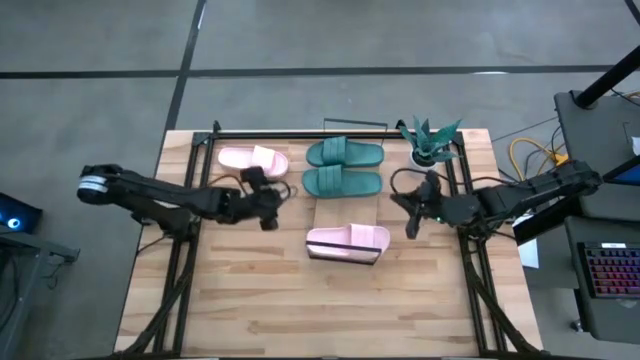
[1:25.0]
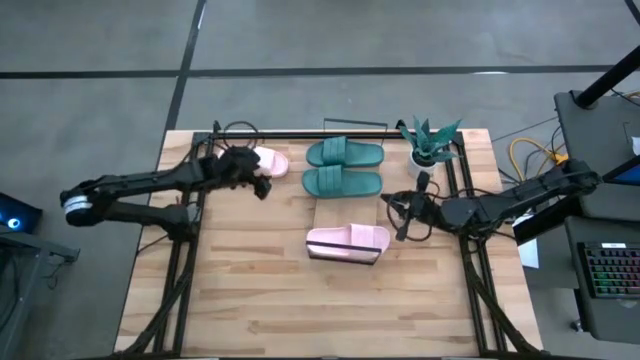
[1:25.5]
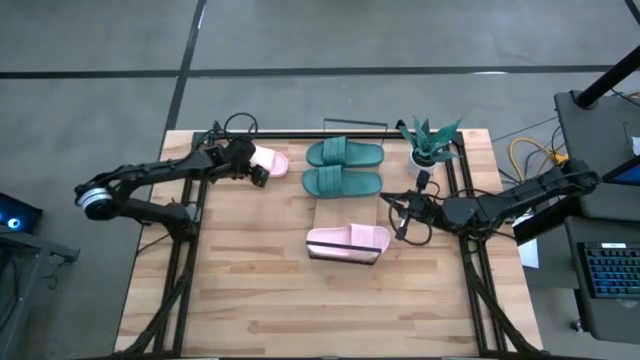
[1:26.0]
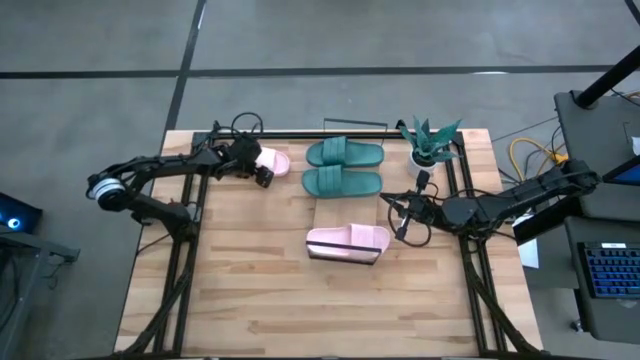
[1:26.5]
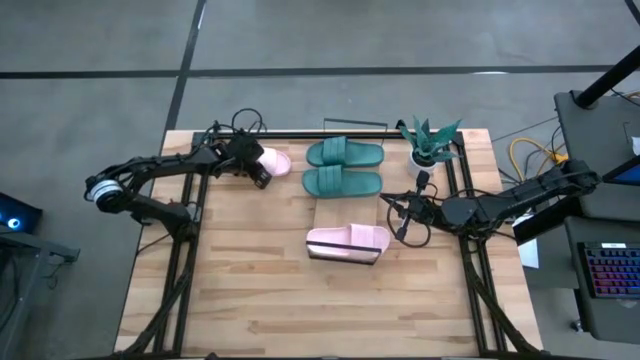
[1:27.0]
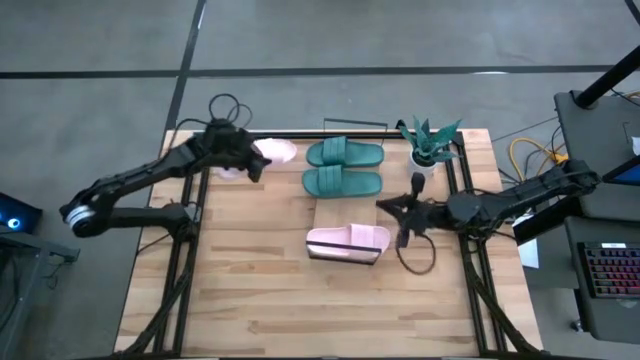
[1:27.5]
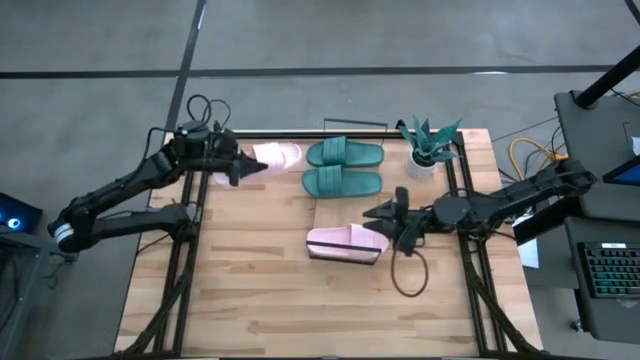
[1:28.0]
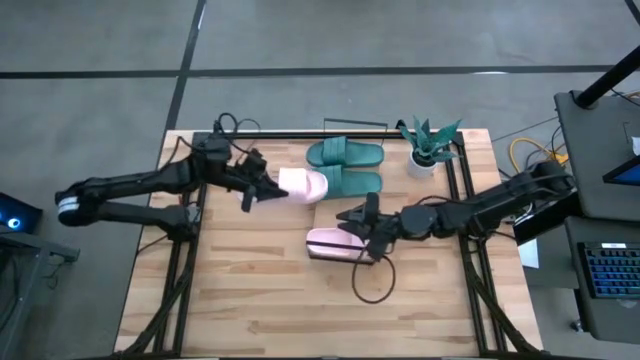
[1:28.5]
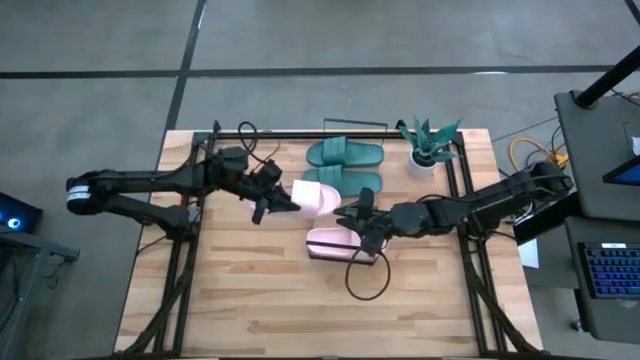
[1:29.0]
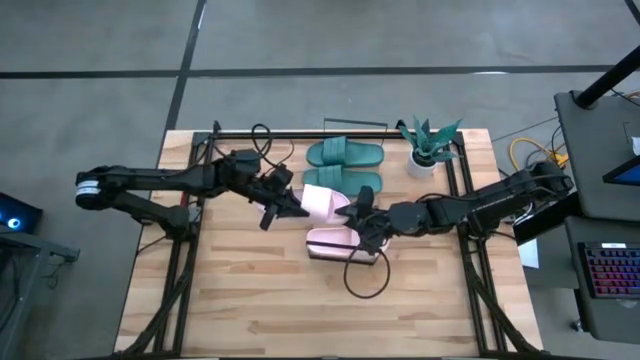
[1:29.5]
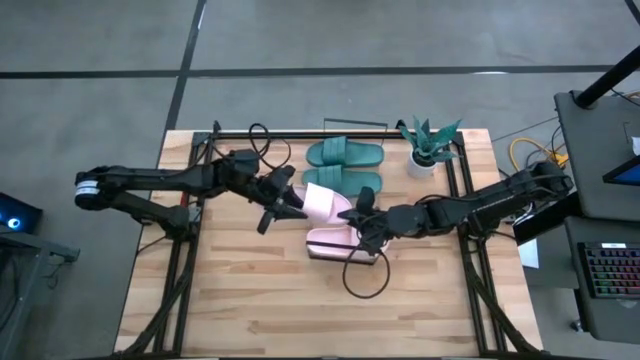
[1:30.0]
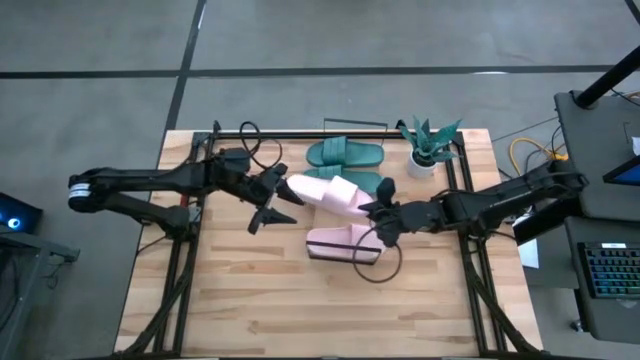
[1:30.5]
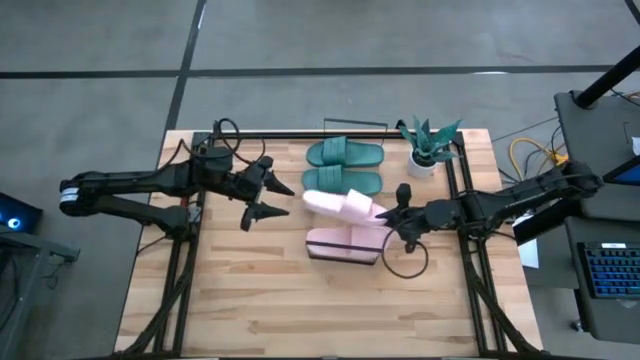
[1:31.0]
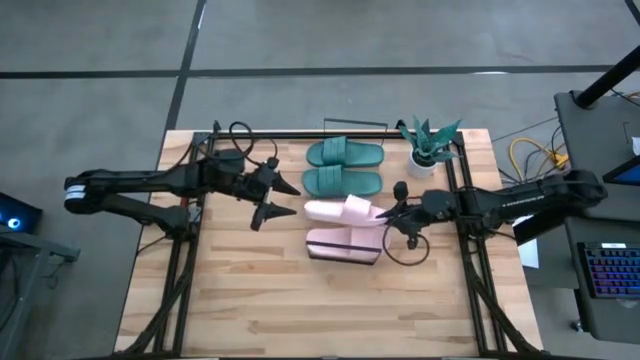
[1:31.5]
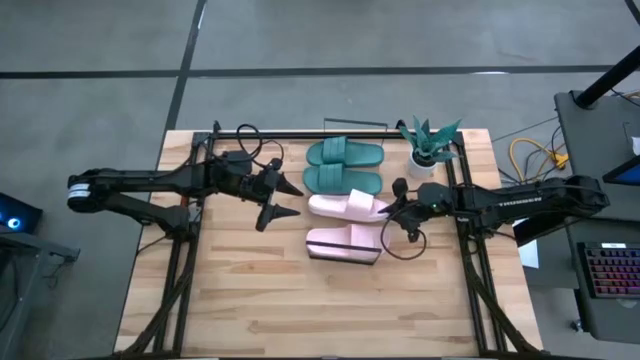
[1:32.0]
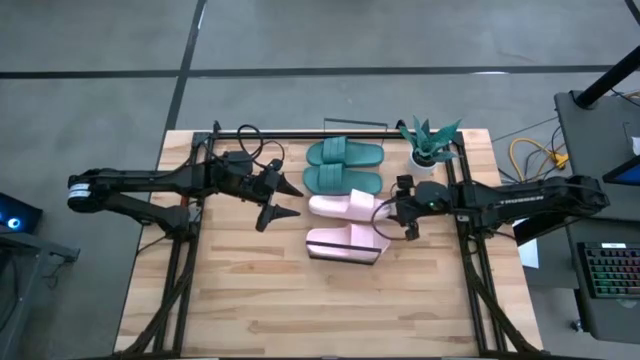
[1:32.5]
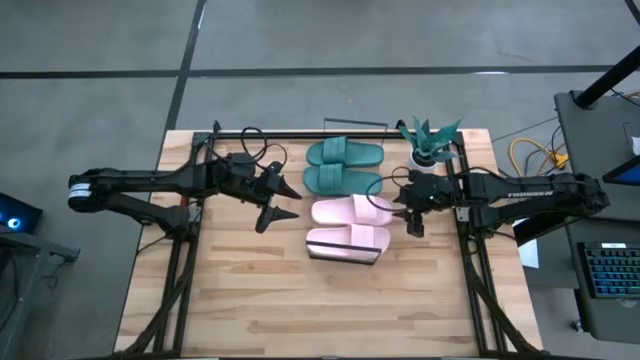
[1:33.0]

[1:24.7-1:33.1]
Task: Pick and place slides into the shelf
Put the pink slipper on the shelf

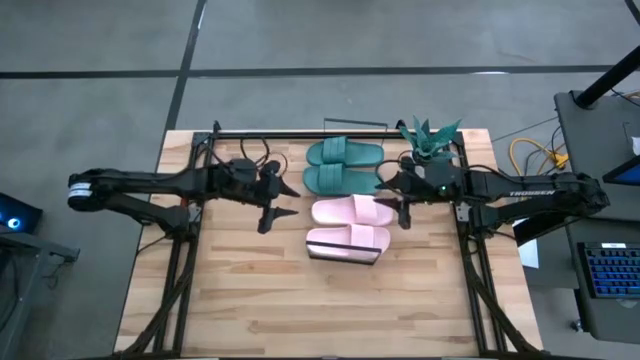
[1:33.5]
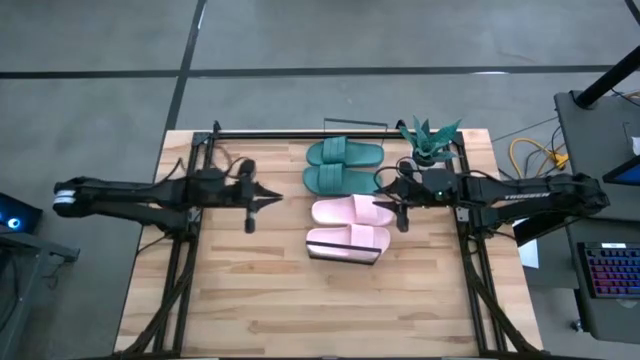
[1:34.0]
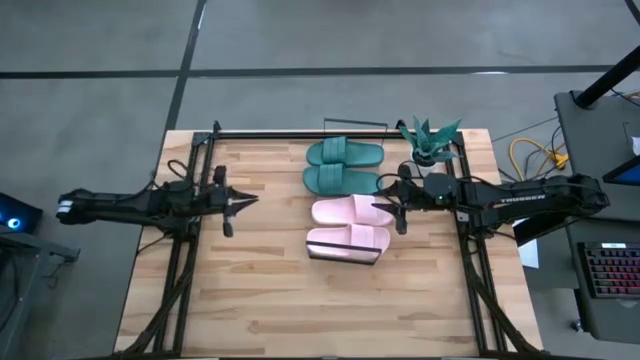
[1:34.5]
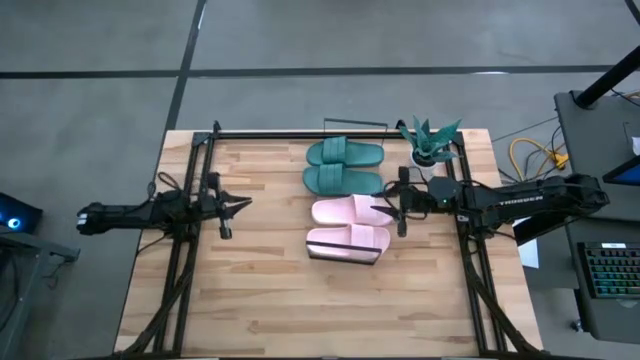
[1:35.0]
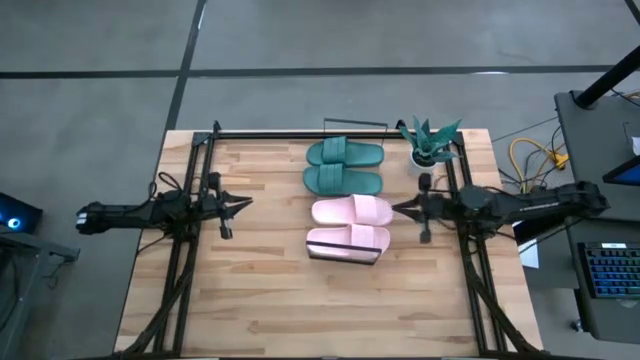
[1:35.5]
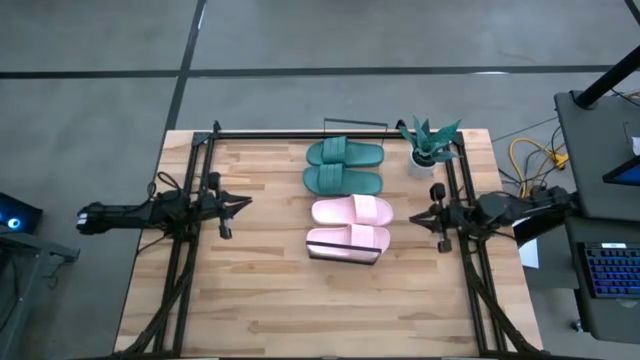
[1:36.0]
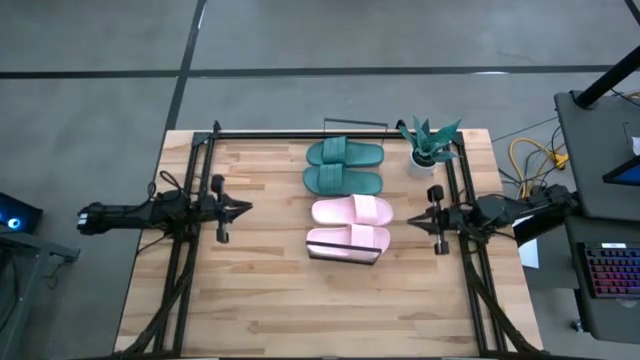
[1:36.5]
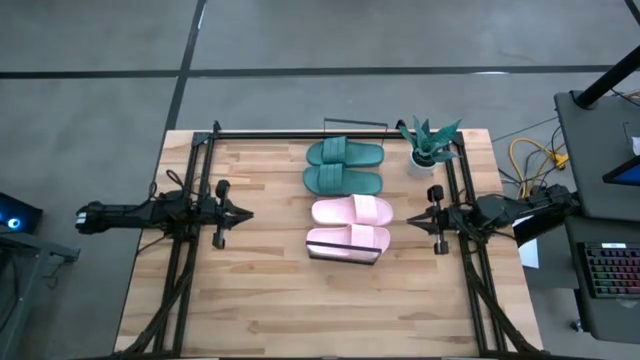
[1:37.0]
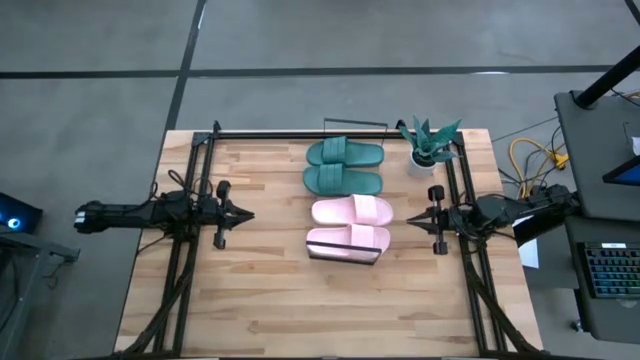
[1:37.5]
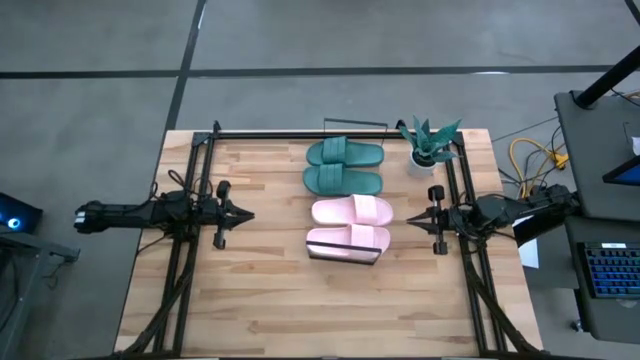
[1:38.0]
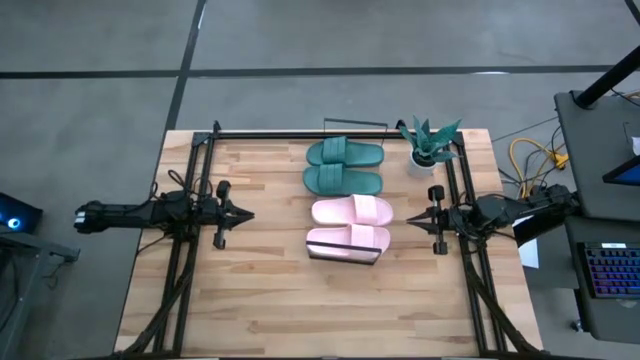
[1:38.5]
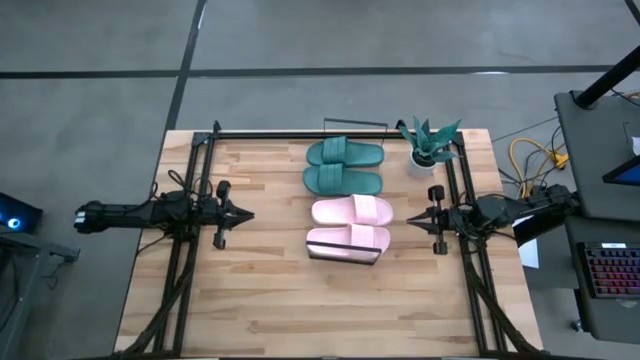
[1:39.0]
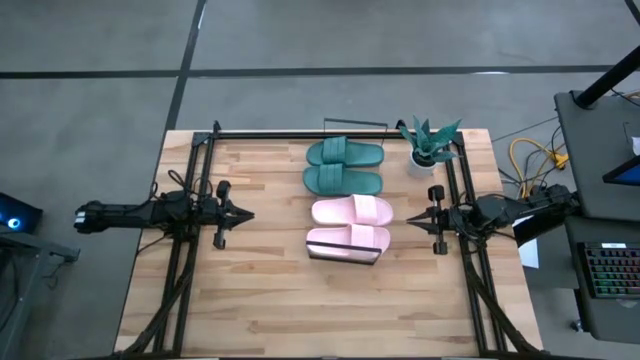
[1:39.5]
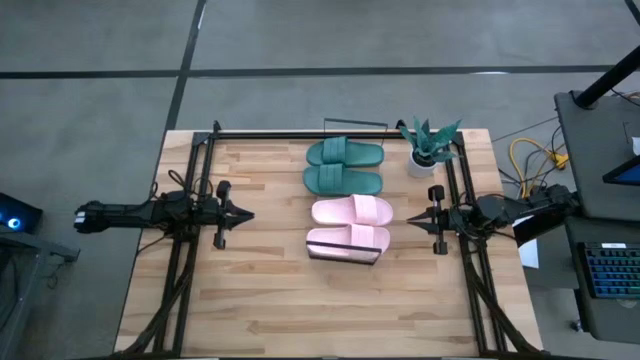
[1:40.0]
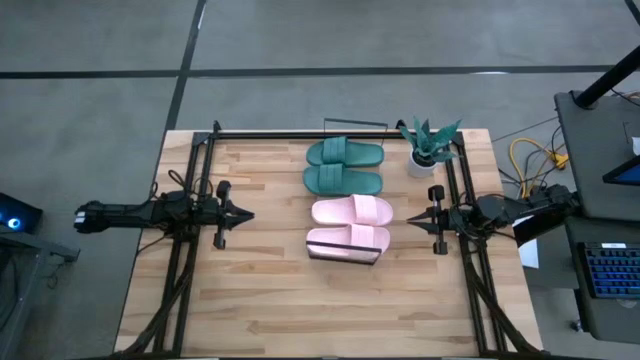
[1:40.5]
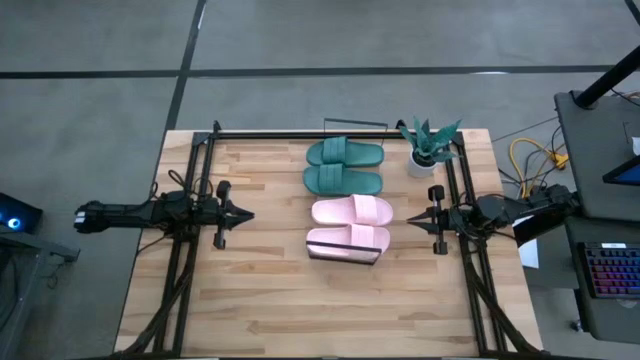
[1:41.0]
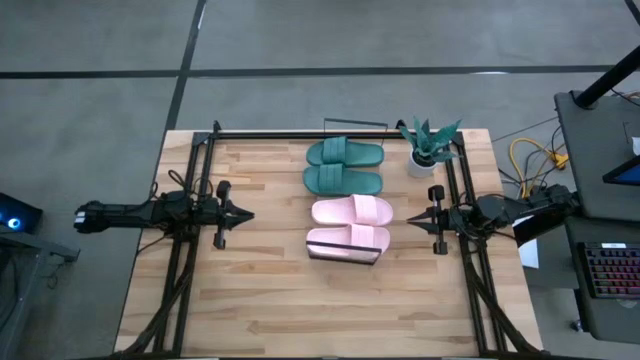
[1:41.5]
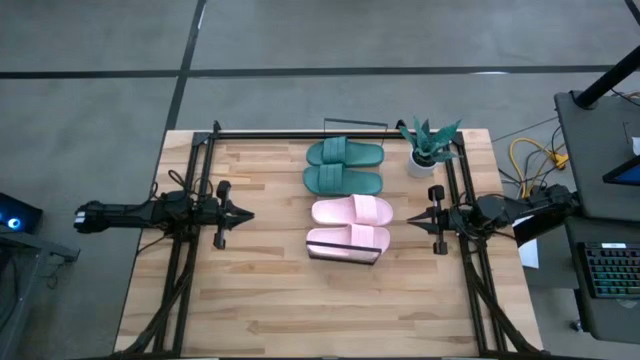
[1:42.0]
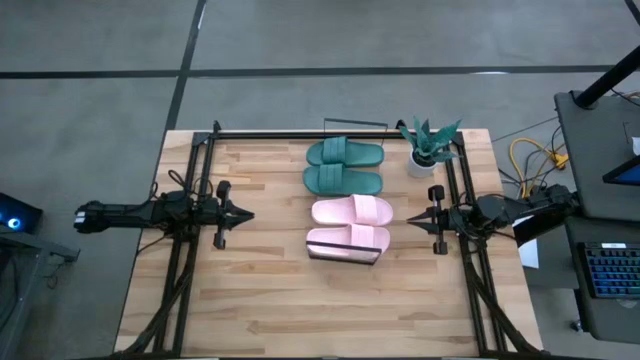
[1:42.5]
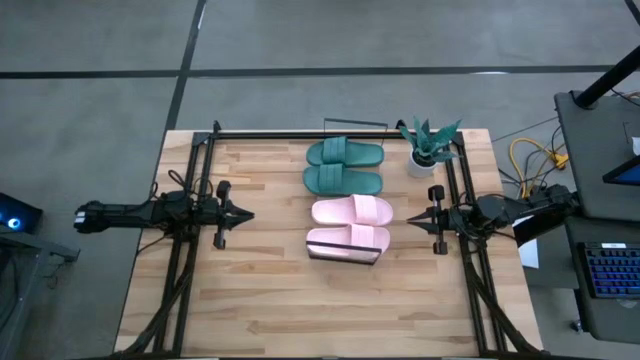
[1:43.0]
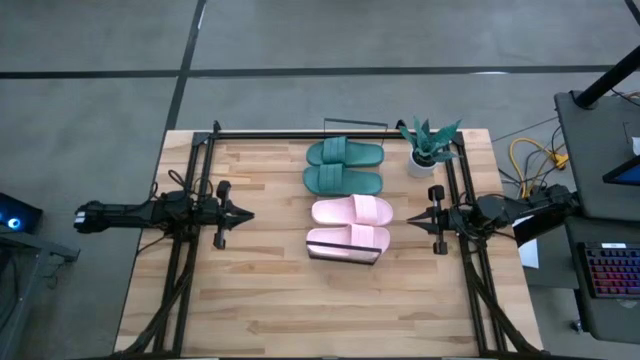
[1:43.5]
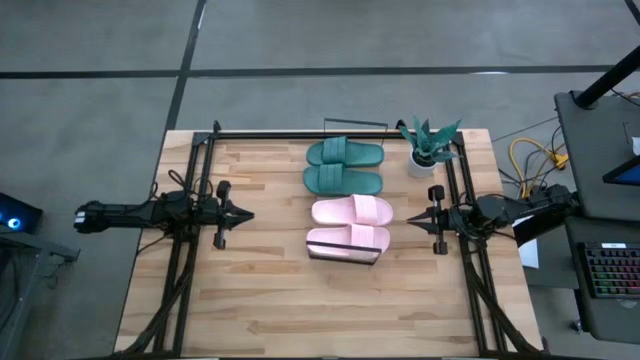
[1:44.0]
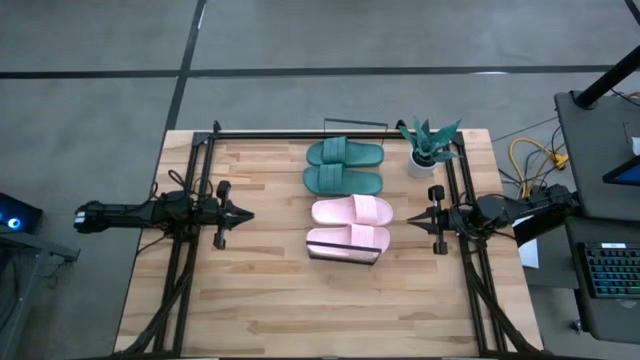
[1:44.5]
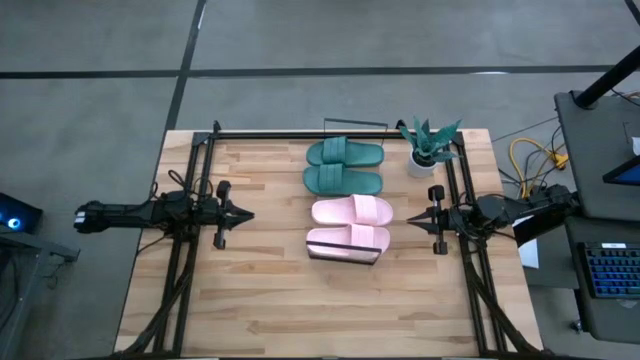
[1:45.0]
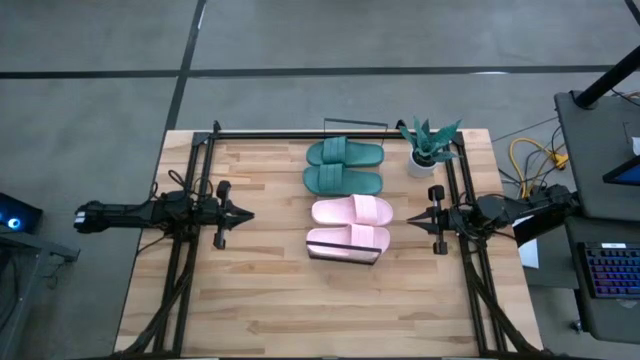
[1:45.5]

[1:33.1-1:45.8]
Return to home position
